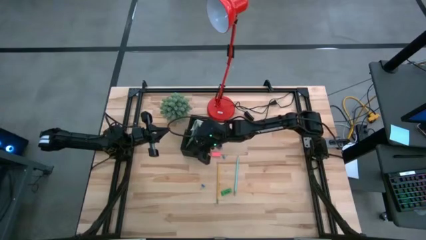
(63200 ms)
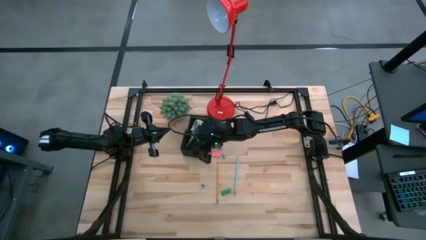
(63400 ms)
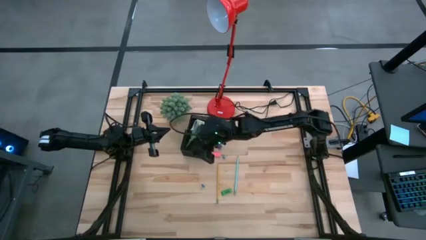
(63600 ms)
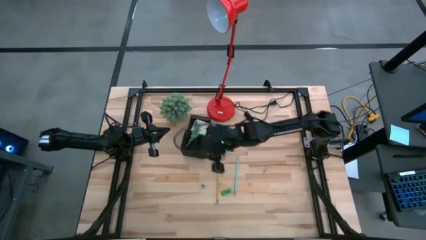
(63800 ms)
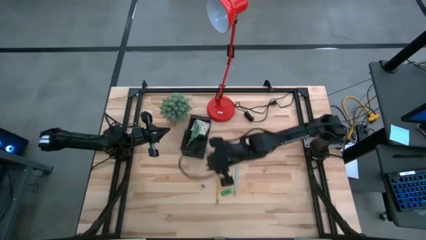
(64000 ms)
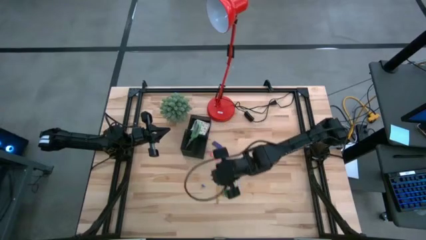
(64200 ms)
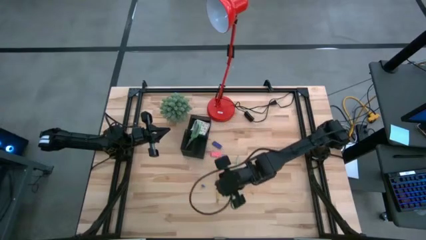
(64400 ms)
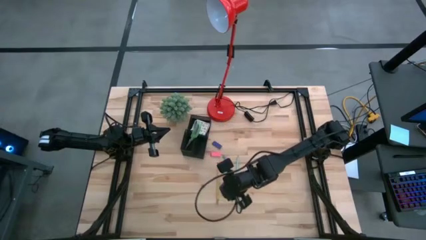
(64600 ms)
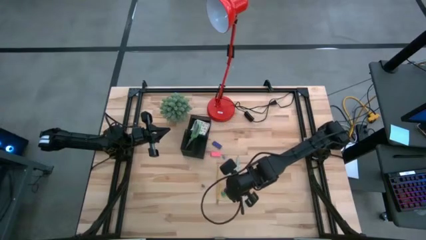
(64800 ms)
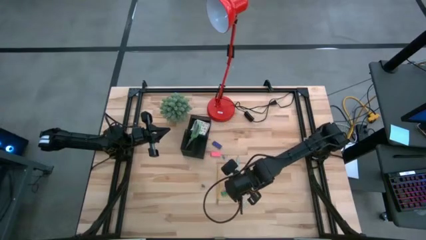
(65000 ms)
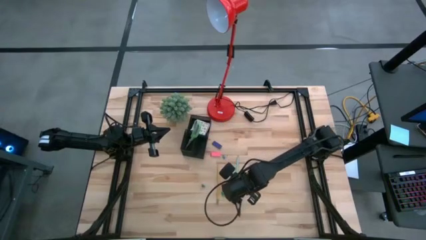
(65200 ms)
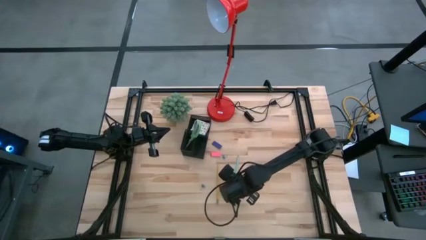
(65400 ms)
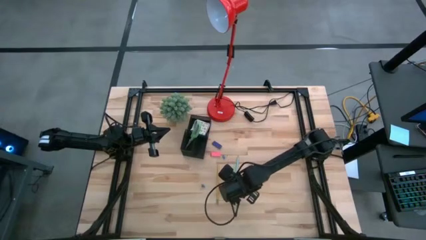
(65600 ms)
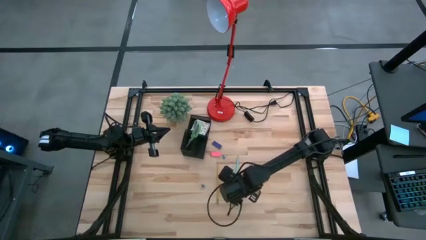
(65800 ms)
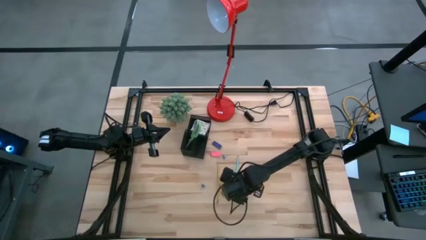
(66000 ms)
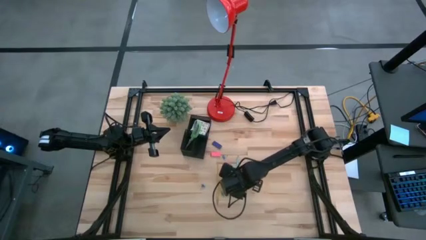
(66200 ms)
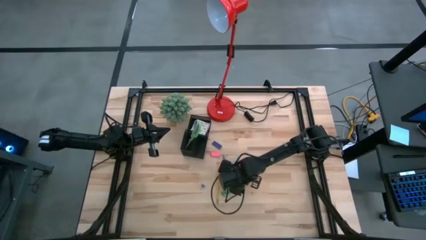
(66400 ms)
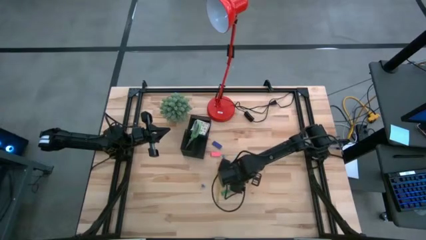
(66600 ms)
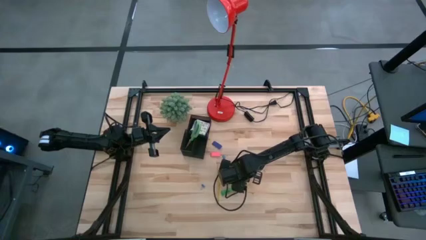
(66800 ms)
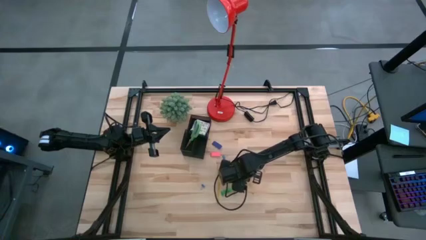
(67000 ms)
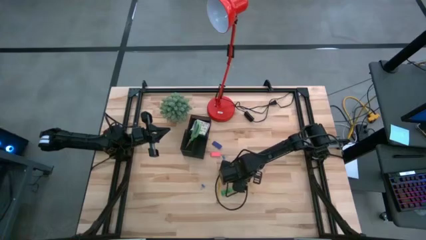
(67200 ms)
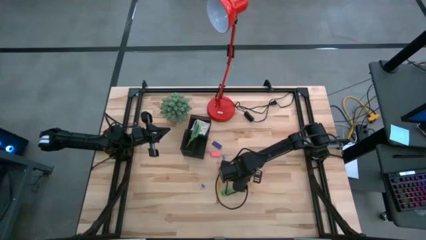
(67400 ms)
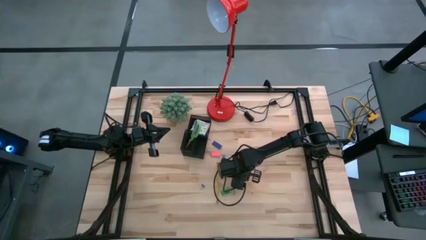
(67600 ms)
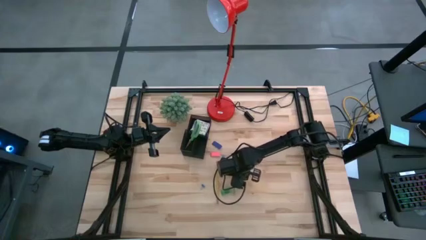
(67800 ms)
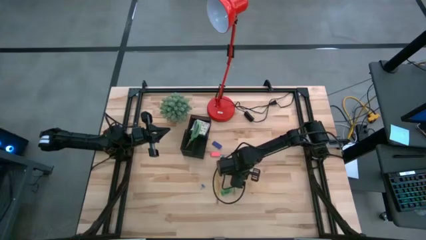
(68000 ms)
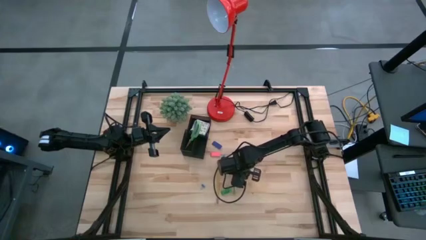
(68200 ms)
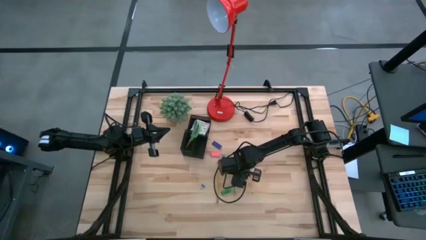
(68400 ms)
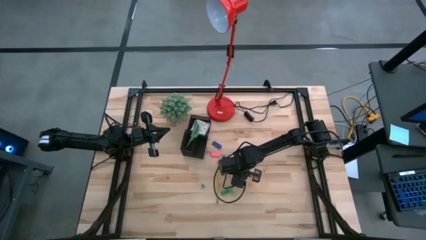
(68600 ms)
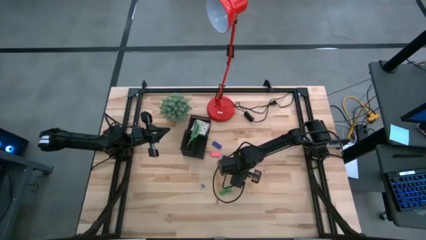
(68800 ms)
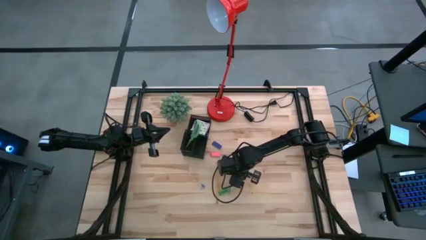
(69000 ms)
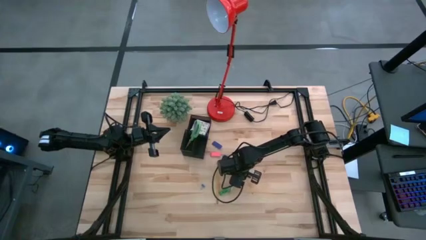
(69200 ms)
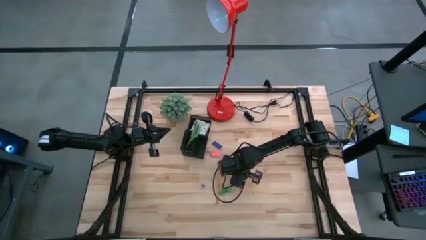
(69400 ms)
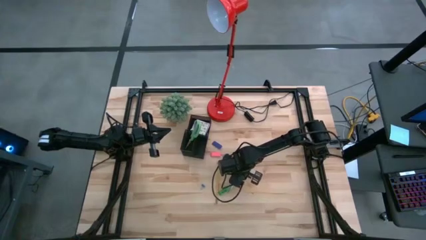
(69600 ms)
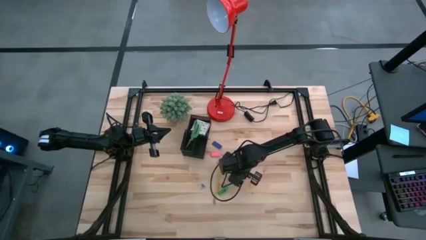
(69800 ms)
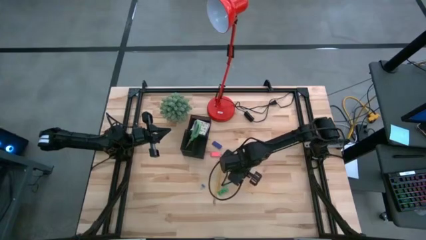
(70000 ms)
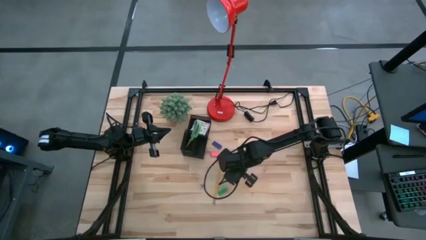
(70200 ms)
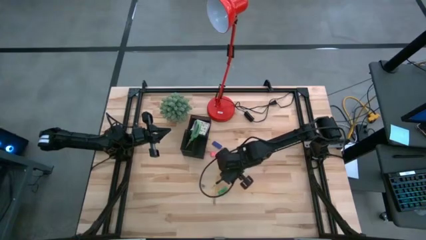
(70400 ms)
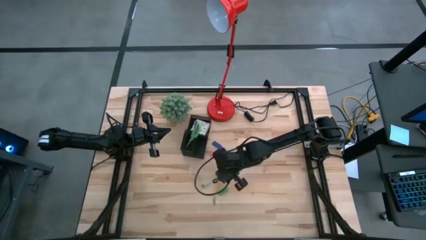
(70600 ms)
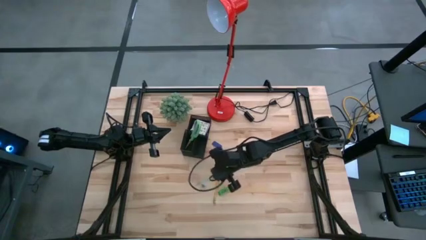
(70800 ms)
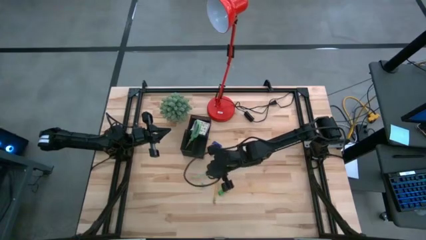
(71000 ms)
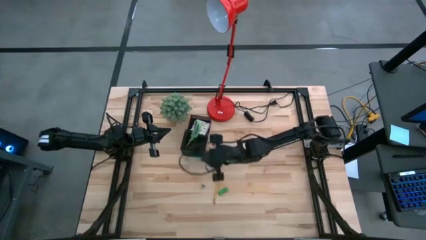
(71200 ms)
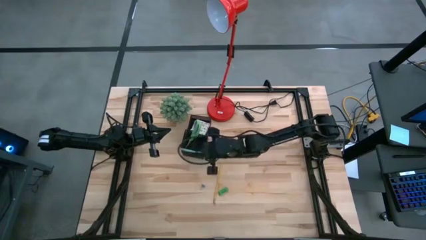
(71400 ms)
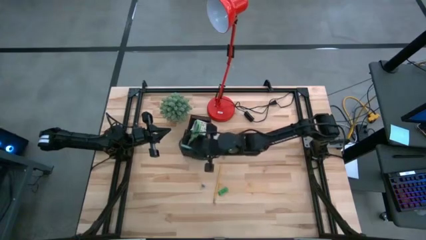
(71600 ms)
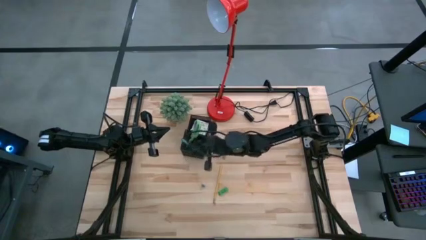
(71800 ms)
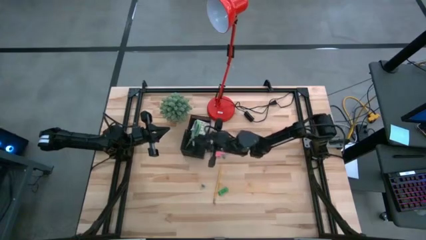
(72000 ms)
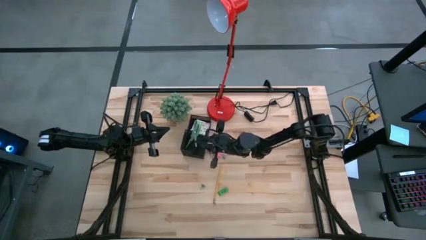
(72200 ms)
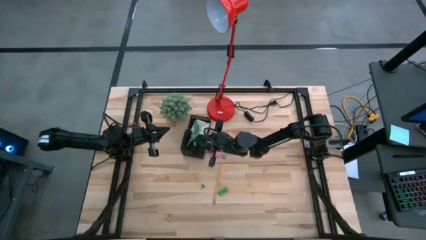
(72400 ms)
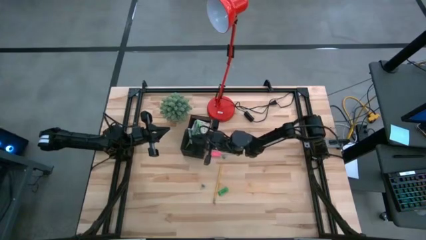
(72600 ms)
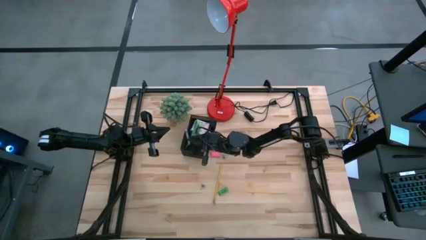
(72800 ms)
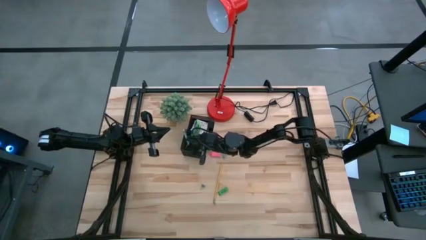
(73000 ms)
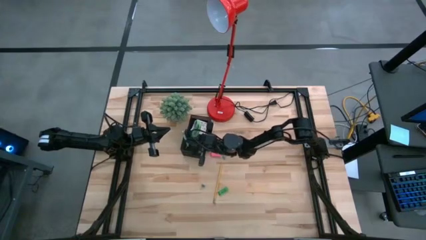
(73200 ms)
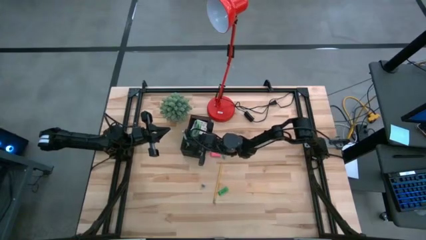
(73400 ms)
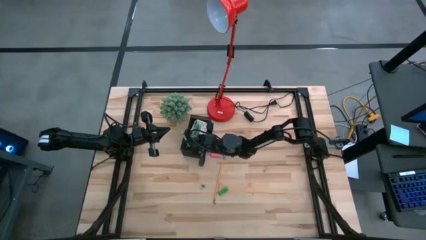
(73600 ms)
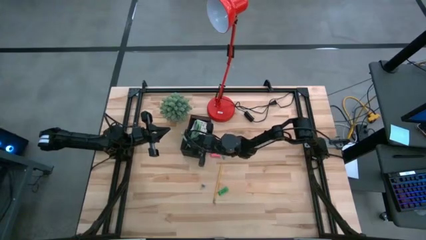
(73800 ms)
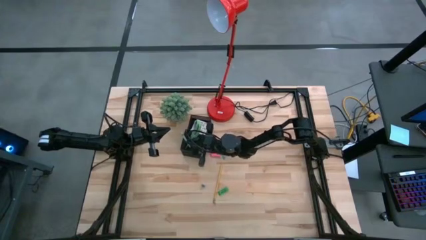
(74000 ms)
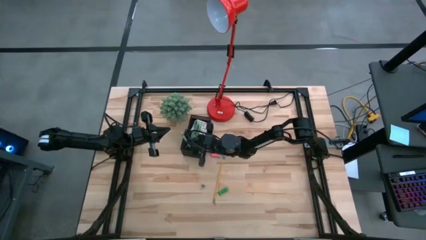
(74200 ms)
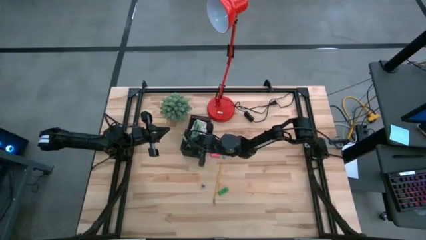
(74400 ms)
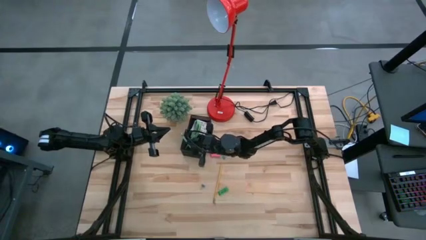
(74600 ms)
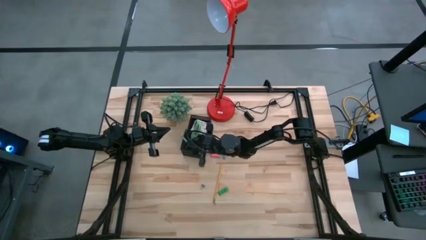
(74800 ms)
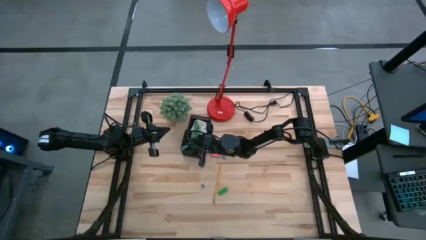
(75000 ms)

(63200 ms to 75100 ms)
Task: Pick and place office supplies into organizer
Put the blue pencil in the black desk organizer
